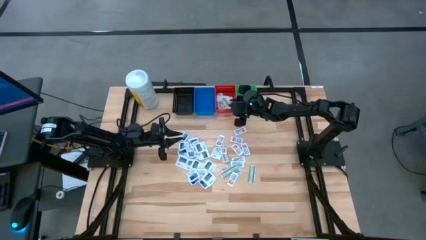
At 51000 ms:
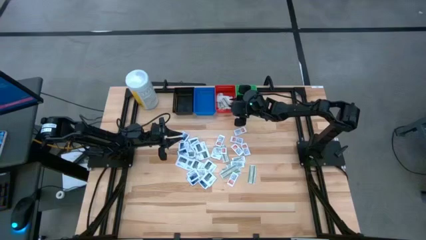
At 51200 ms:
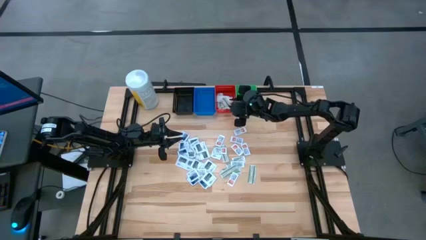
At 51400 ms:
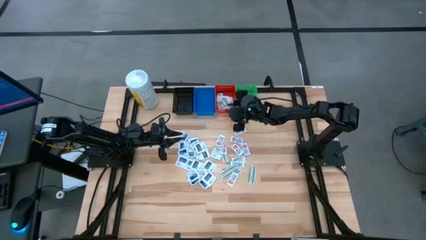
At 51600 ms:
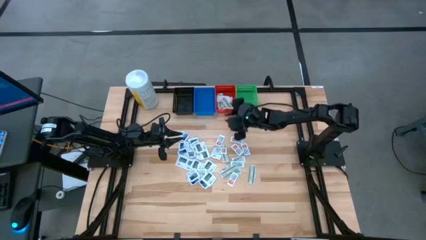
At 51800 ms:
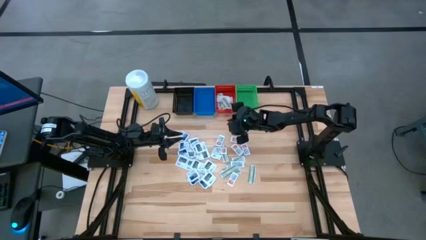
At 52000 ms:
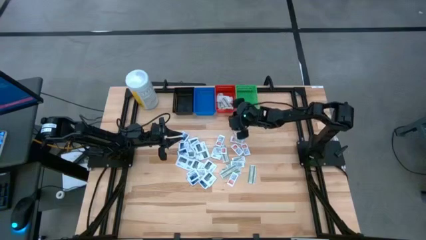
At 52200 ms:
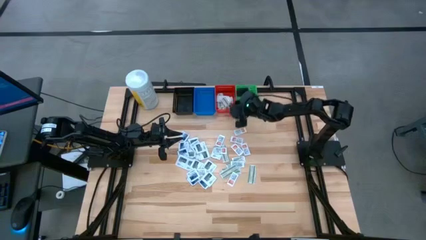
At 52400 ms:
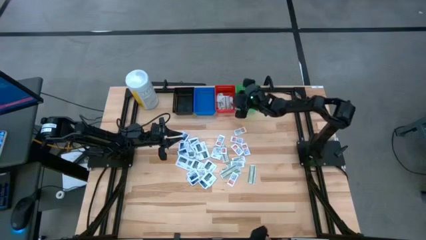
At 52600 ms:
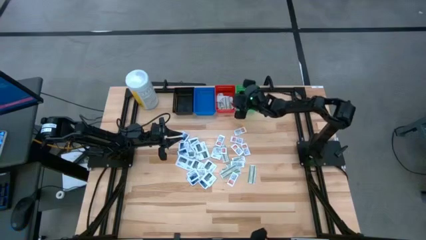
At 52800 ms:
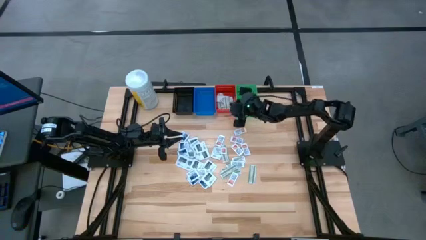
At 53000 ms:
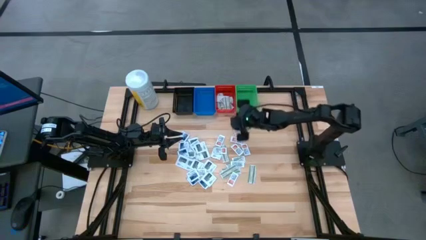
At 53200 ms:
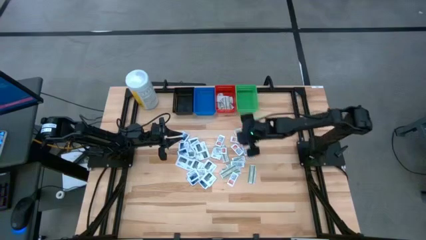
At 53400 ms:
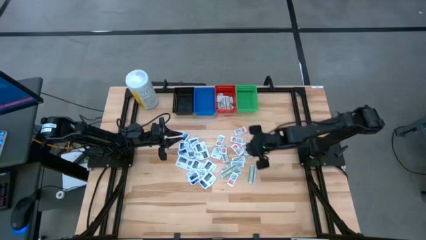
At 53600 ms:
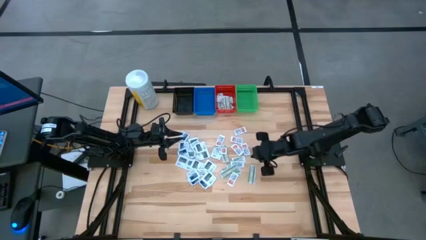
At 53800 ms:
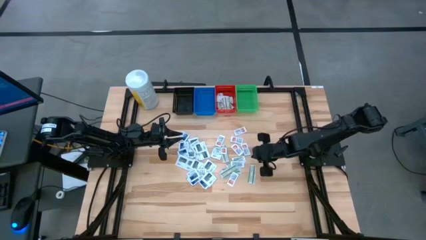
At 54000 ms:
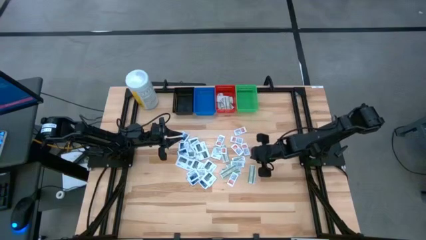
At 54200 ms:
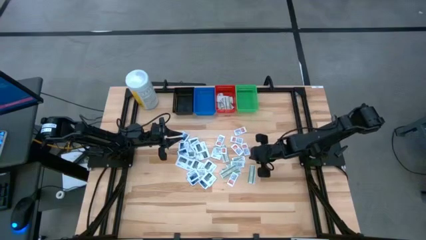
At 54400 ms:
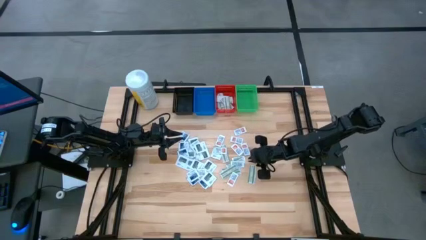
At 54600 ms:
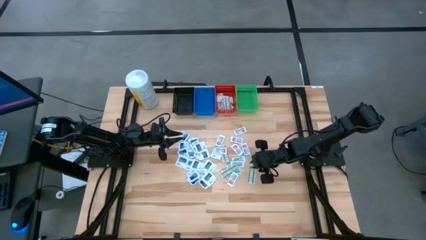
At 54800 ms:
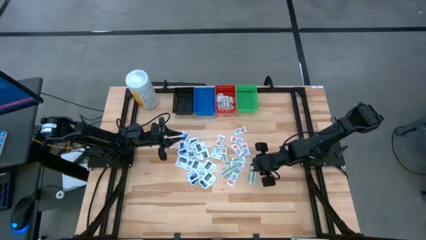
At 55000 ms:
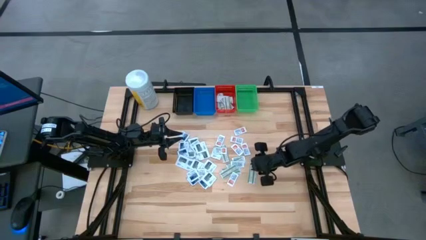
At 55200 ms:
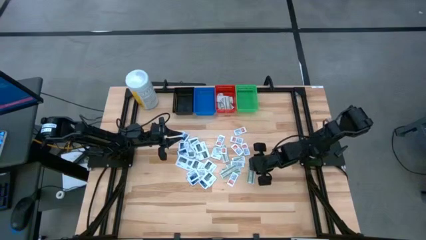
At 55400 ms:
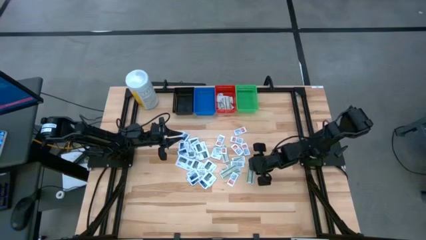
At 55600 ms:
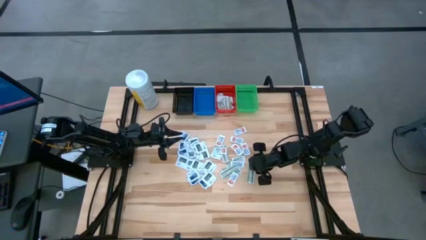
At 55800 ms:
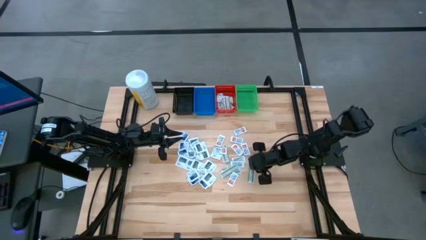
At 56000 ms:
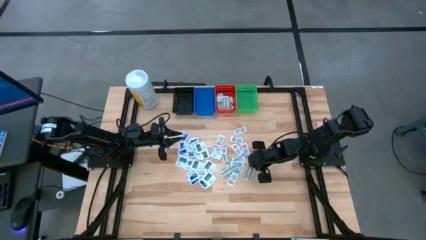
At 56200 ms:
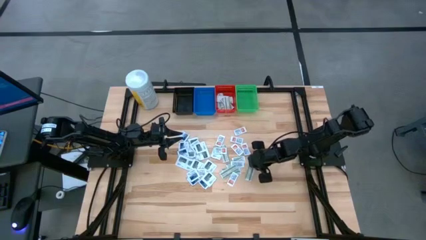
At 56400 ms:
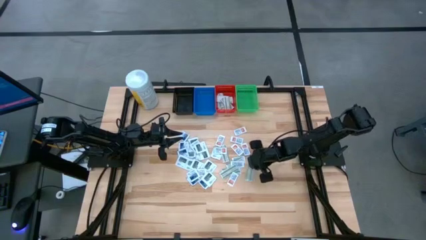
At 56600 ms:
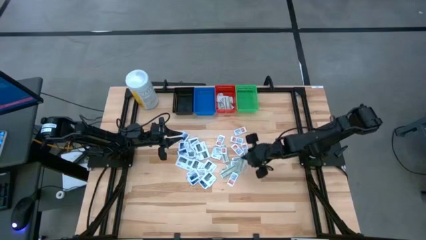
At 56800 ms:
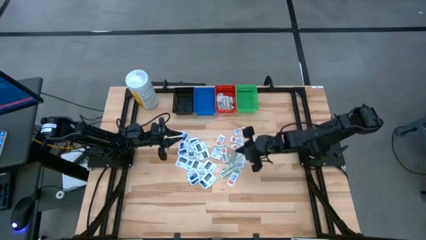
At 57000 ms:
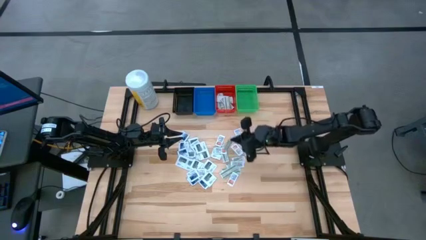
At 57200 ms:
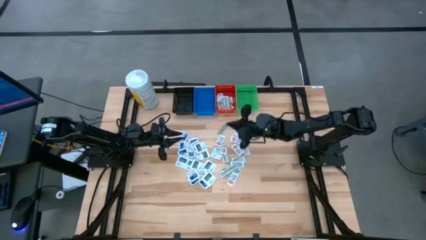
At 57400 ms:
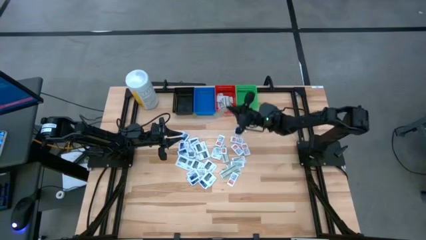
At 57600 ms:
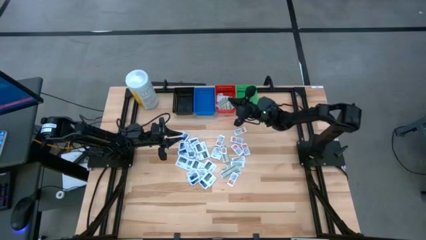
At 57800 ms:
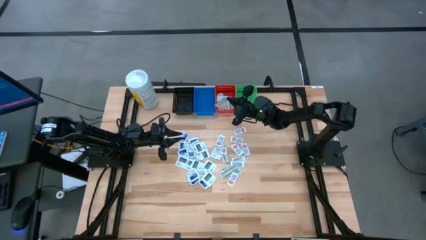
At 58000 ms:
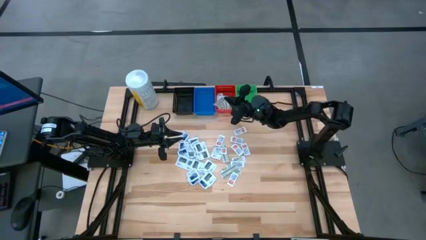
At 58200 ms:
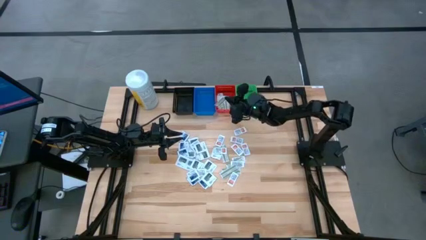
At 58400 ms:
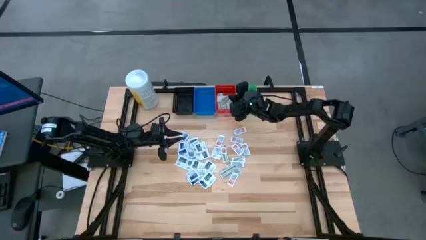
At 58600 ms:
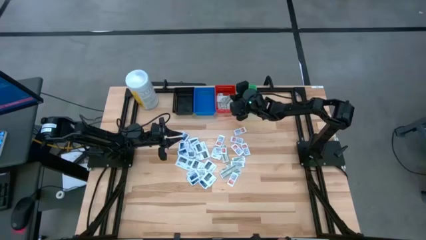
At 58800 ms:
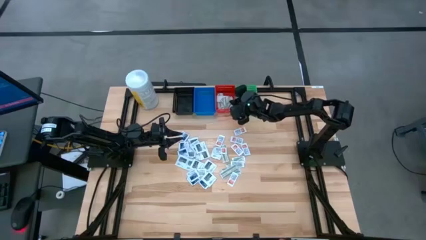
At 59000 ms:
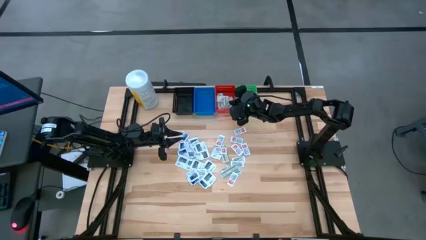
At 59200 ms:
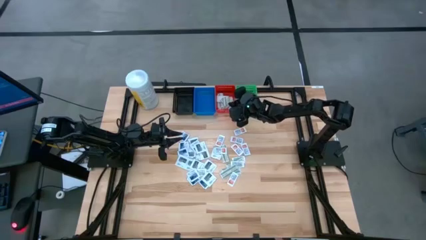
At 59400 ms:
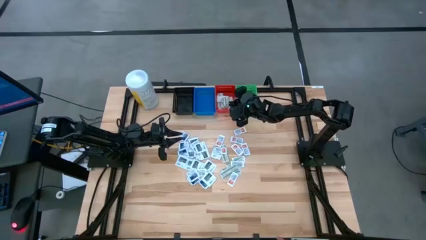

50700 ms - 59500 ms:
Task: Pick & Place First Aid Supplies
Put the green bandage pack into the red bin
